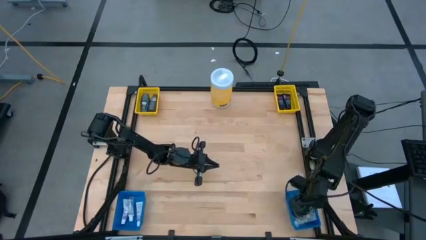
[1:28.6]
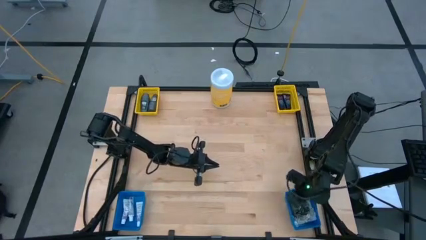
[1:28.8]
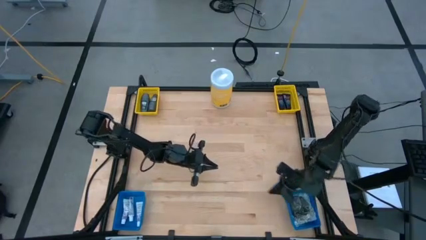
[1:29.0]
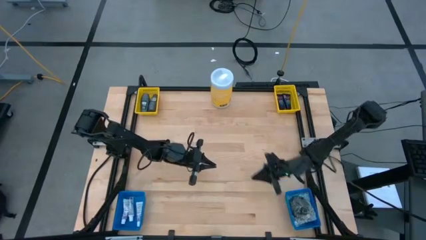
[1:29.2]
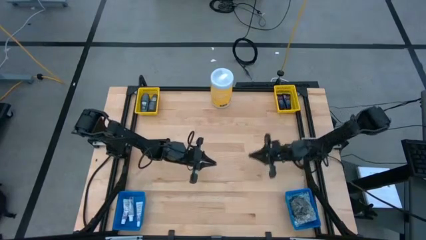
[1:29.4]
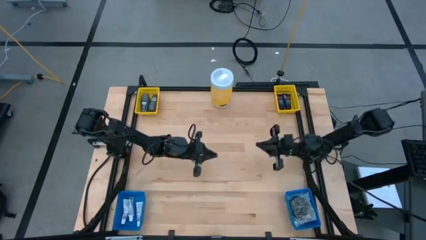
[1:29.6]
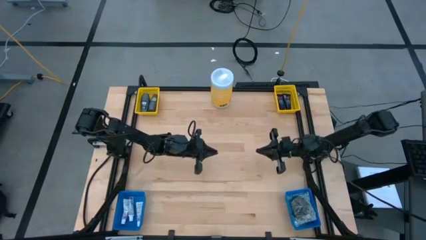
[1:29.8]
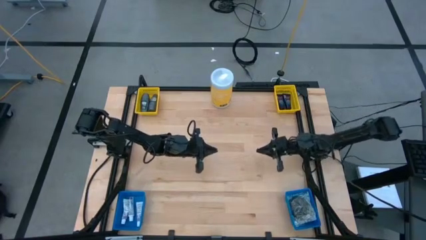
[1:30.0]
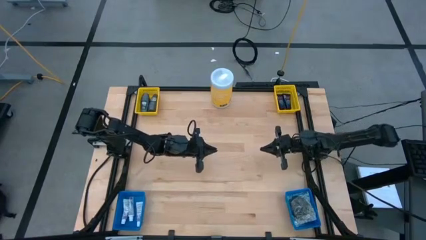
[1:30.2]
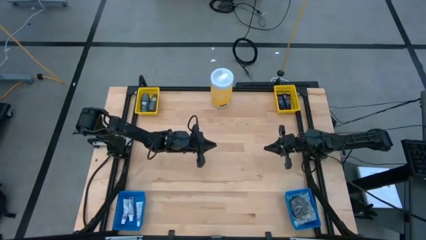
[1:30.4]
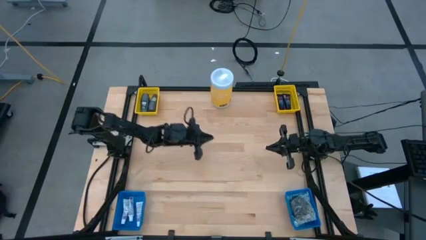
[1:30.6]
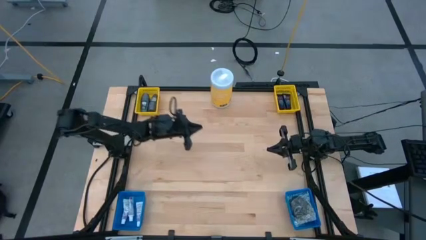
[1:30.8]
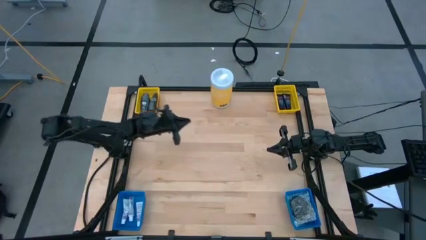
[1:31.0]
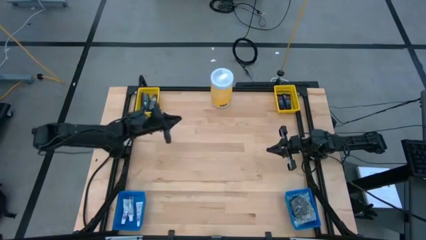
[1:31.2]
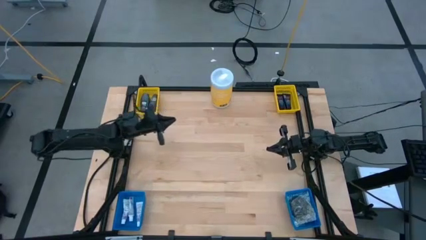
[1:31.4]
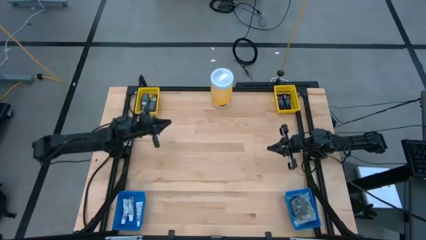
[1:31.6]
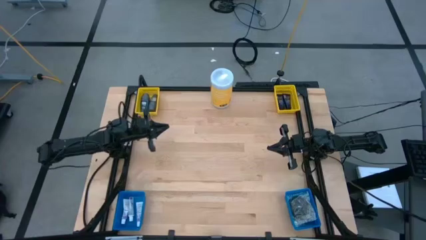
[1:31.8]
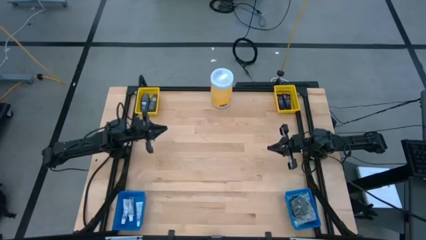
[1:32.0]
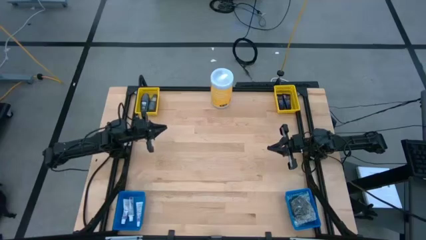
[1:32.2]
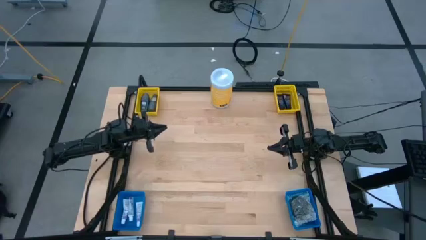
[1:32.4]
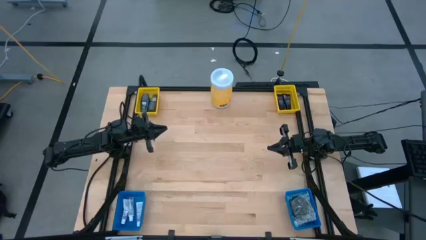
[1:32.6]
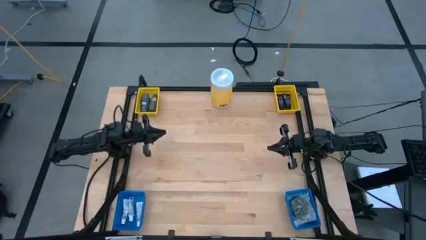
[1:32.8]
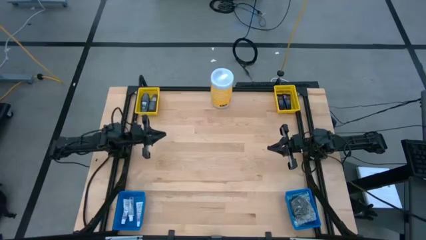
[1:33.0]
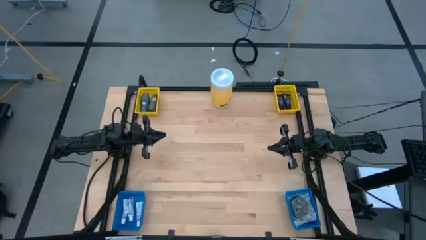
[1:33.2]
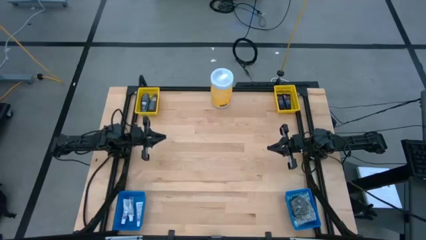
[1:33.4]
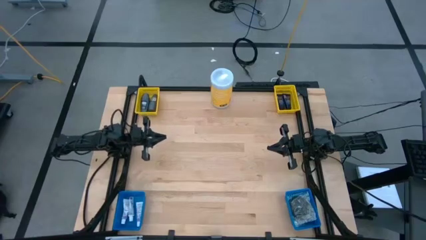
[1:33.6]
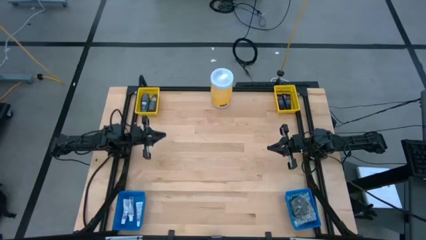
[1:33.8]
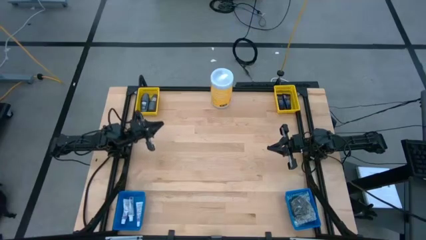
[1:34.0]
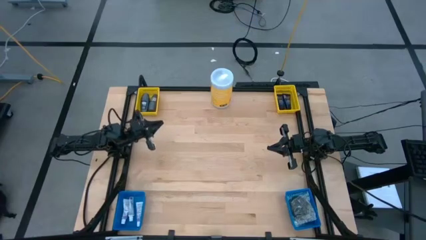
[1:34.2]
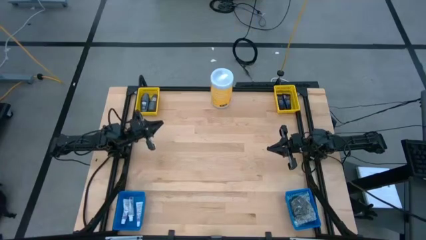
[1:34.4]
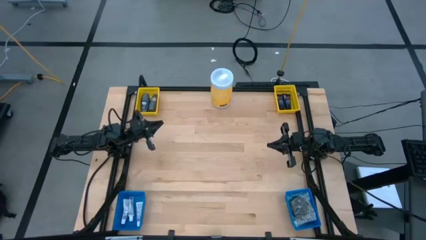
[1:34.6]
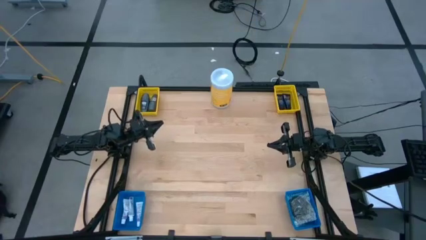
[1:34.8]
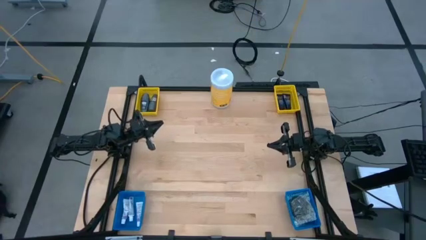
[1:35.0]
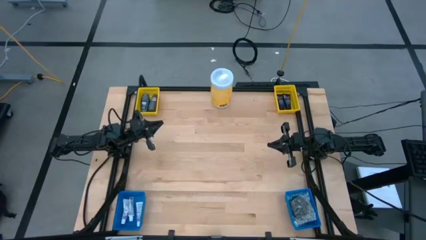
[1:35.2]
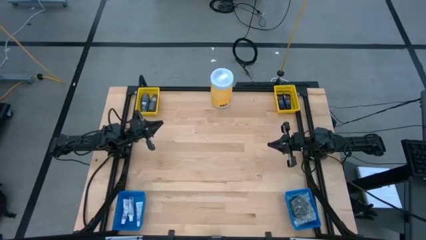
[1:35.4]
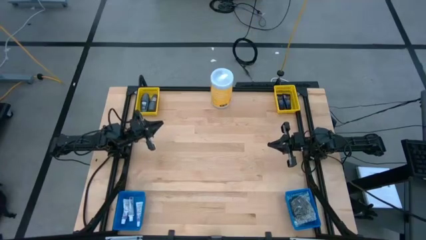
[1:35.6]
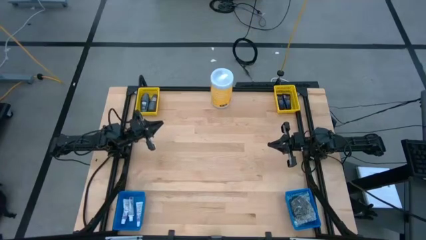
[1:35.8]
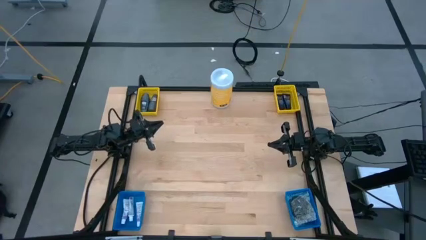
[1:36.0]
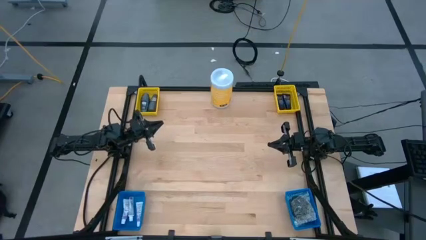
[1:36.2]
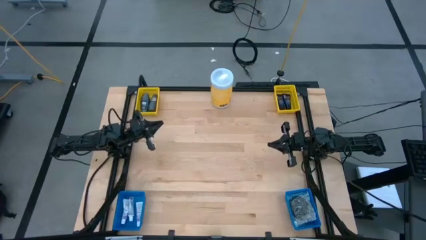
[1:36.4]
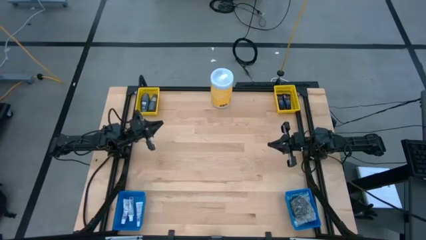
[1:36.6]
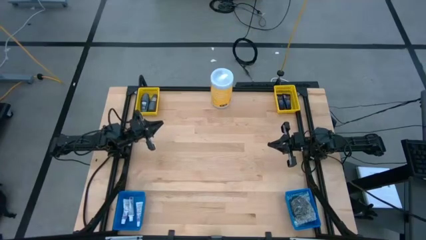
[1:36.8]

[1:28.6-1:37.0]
Task: Pick & Place Travel size toiletries
Return to Home Position

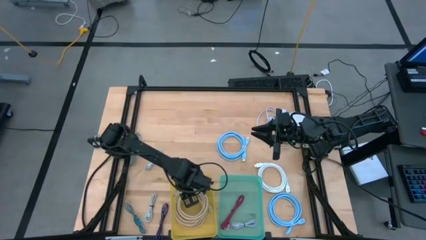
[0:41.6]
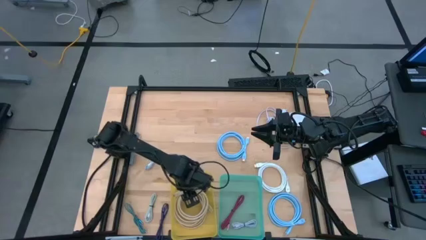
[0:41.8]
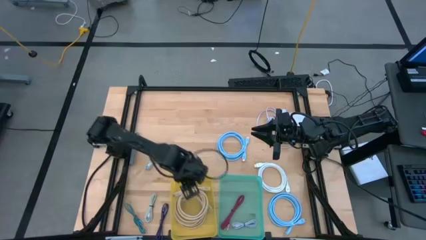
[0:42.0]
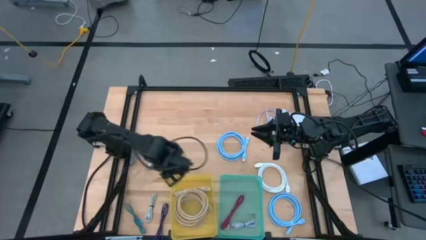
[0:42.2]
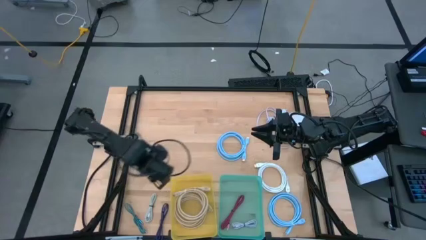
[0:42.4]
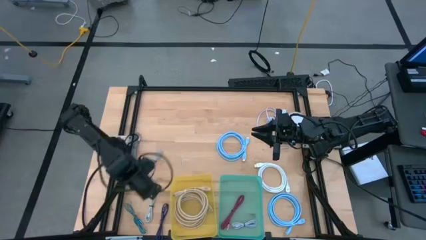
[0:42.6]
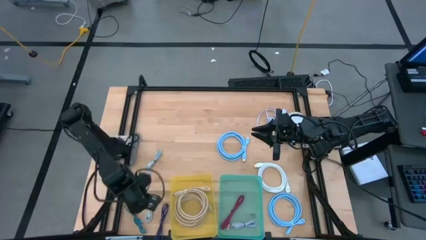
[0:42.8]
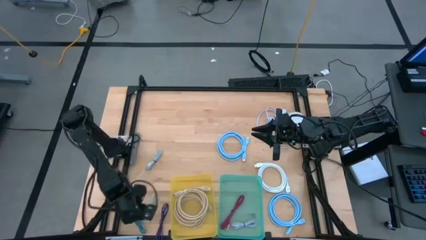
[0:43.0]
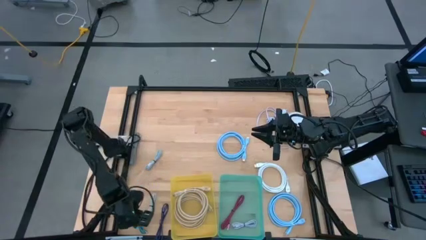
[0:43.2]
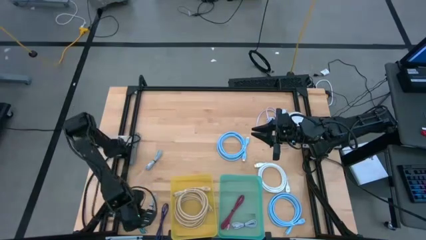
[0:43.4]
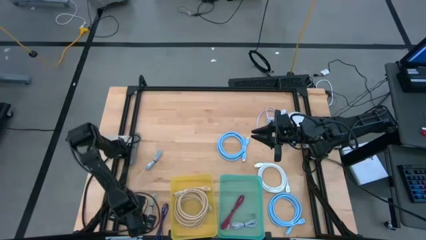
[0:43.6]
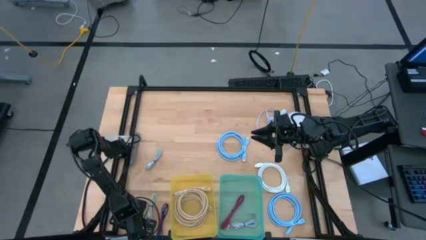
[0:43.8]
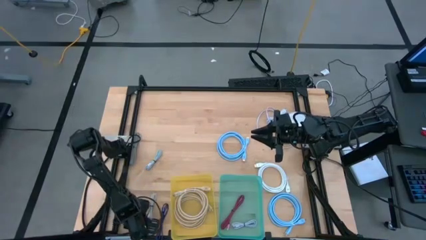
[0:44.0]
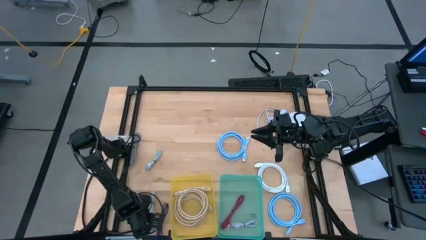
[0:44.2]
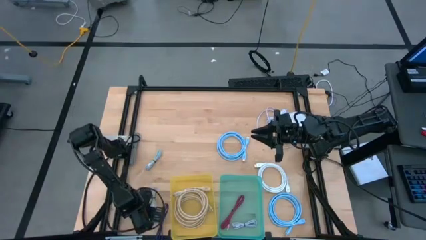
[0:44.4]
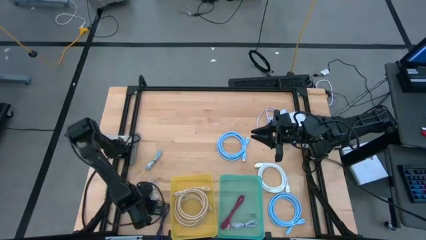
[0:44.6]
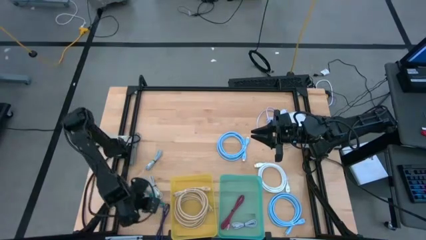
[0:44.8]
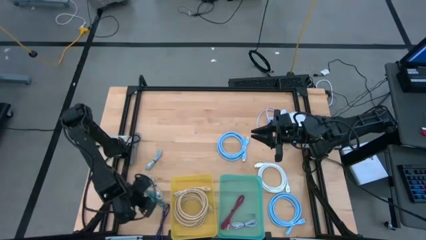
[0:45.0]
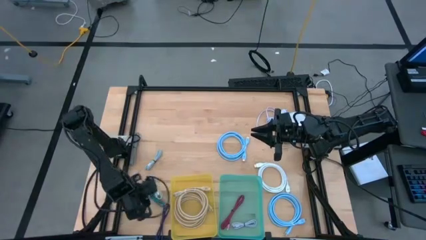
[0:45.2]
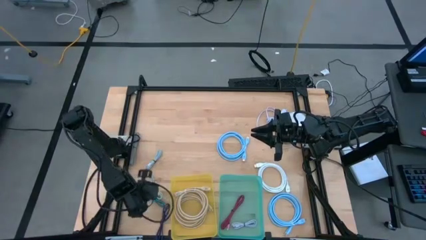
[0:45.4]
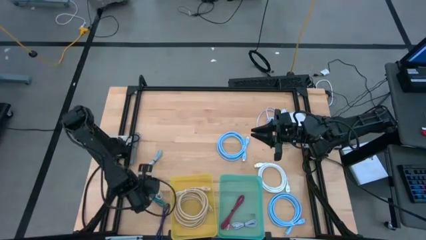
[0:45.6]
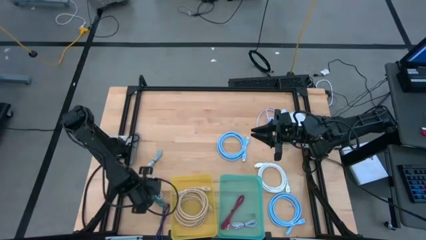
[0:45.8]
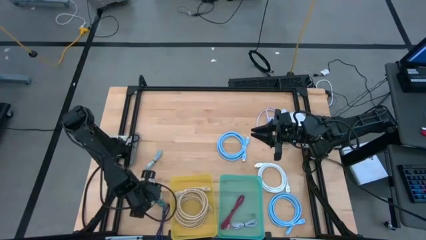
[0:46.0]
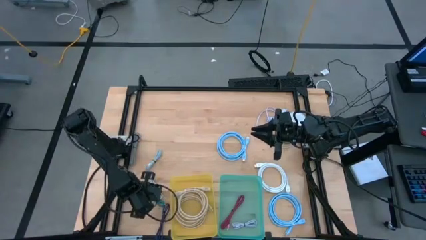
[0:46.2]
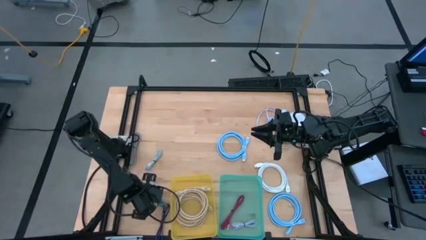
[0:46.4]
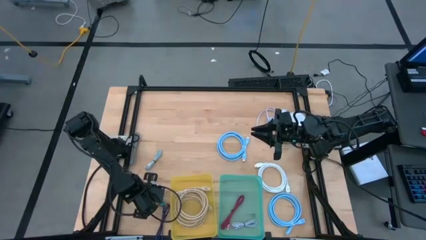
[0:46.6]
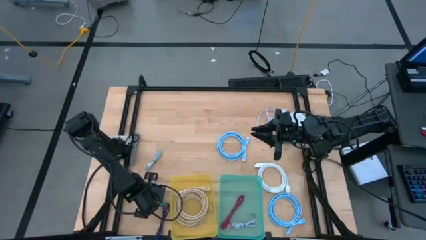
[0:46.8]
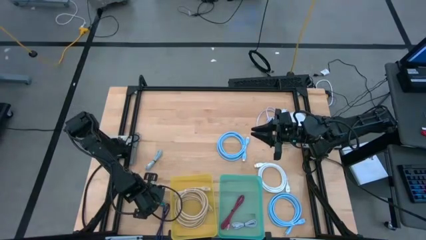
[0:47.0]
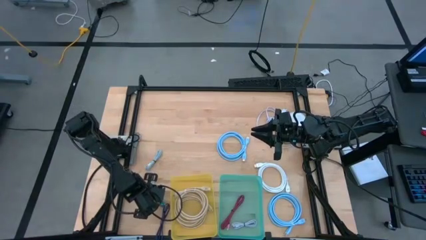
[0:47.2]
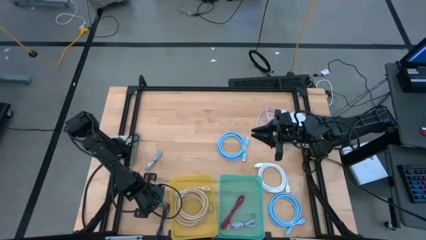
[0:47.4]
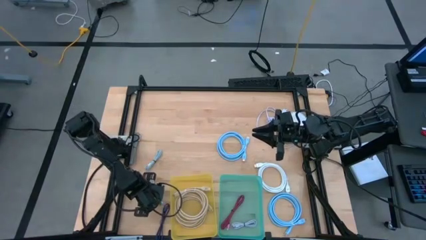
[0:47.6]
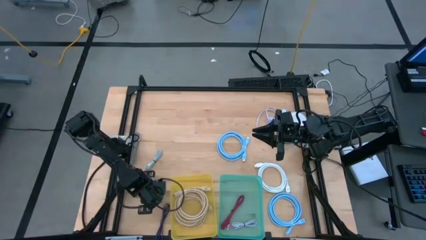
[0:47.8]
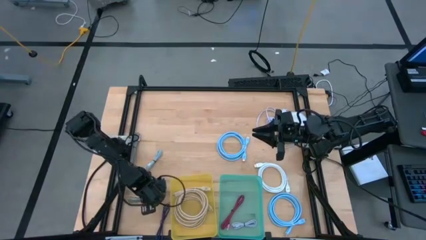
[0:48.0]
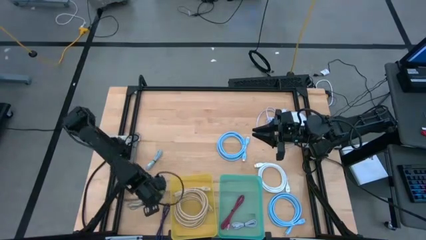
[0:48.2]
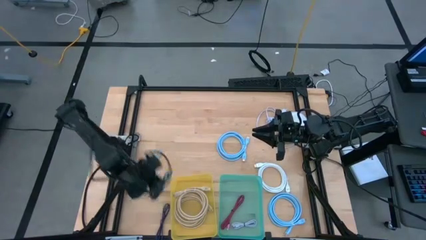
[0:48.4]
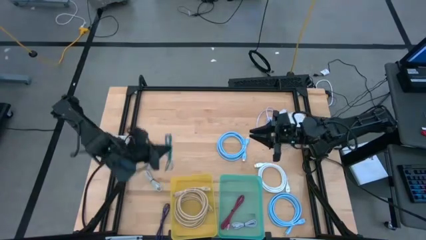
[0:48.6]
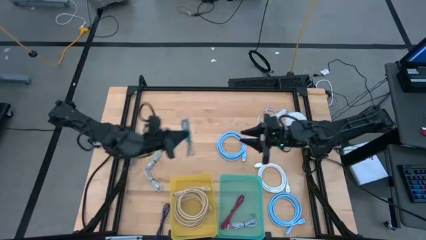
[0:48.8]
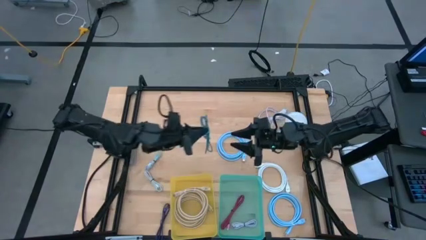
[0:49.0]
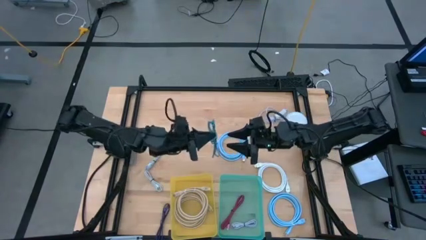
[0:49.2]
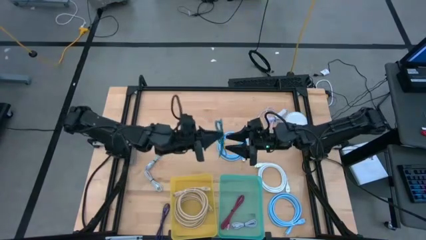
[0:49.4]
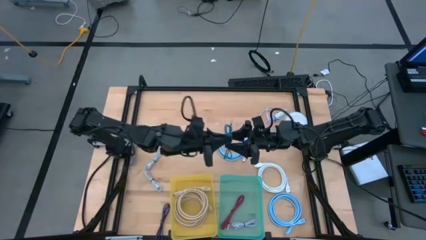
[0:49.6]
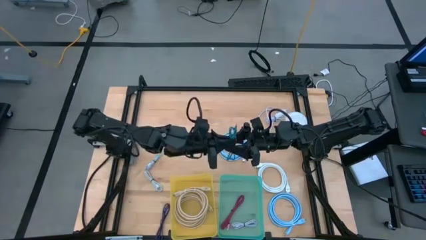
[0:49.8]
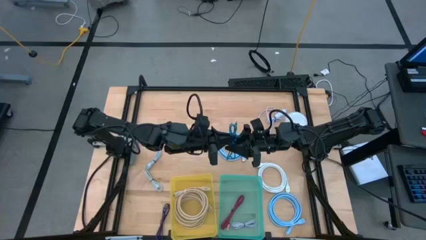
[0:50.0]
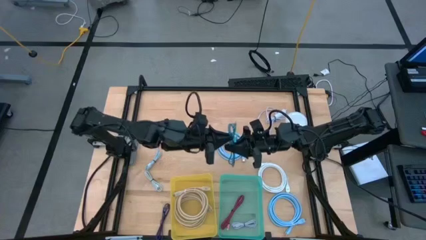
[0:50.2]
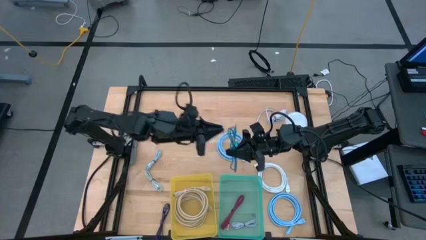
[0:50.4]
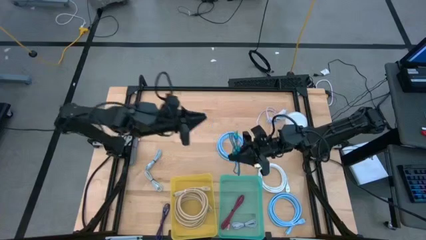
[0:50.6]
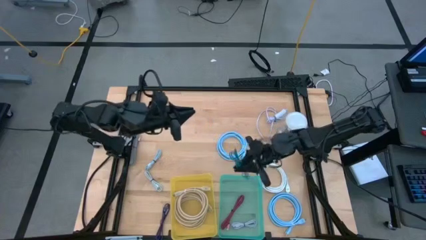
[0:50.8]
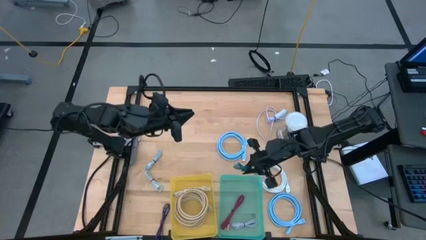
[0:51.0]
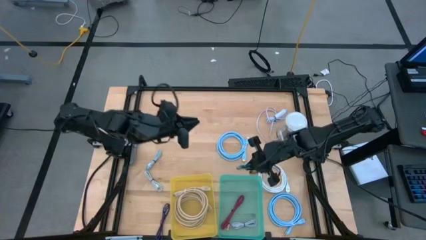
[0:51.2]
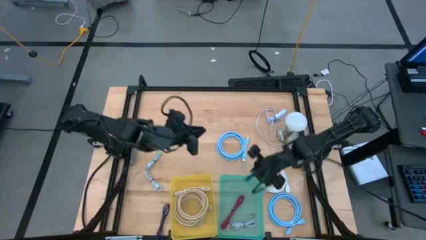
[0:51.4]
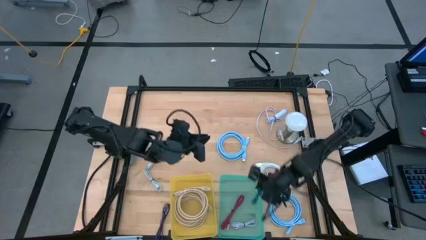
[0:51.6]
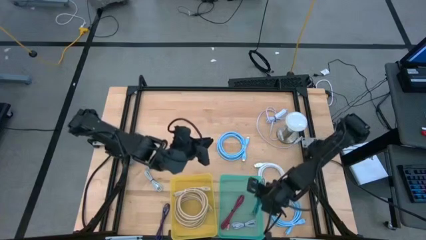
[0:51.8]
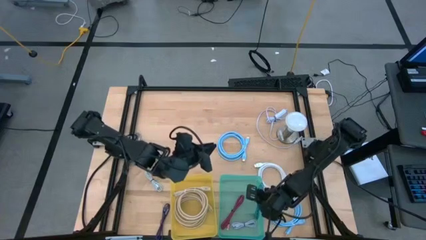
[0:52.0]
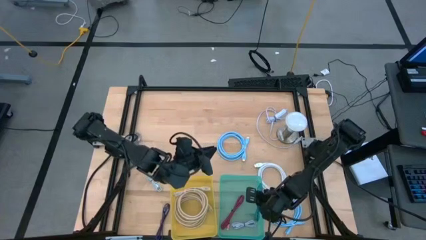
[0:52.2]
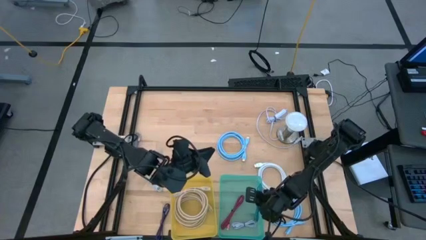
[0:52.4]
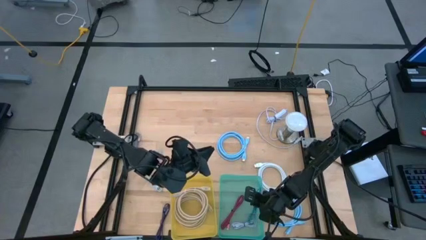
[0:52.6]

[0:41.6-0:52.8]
Task: Pick & Place USB Port
Put the small blue charger cable into the green bin
